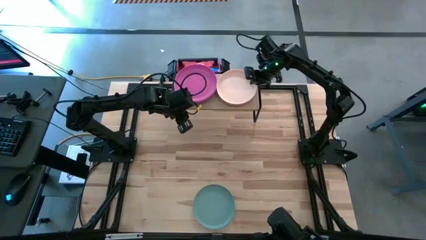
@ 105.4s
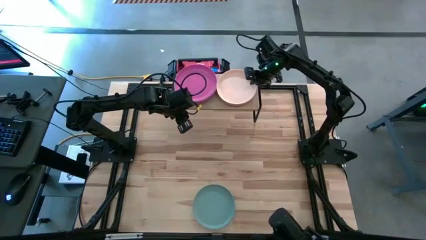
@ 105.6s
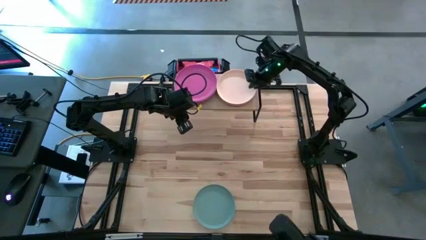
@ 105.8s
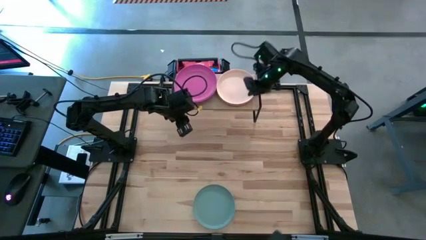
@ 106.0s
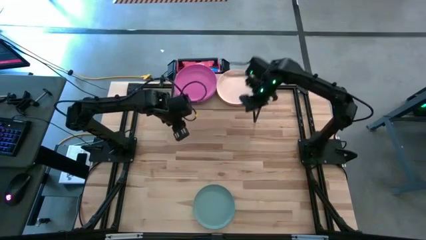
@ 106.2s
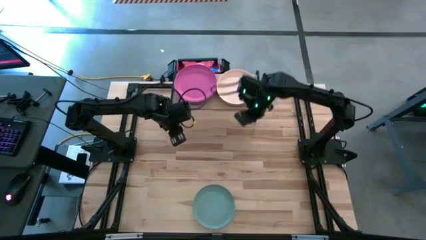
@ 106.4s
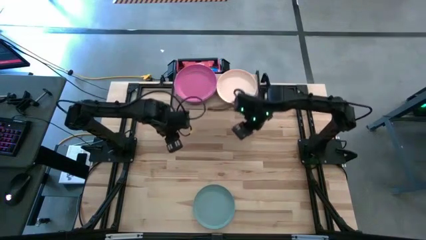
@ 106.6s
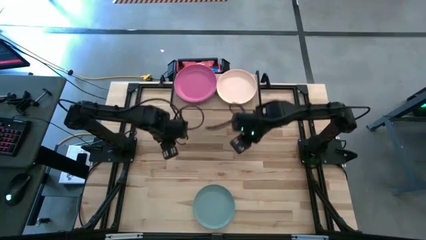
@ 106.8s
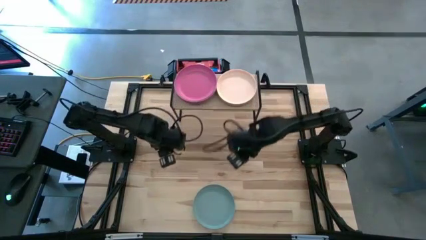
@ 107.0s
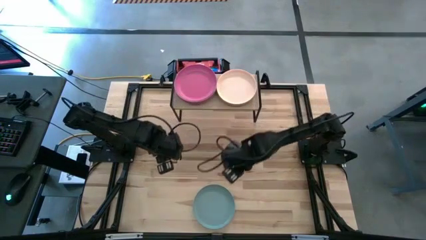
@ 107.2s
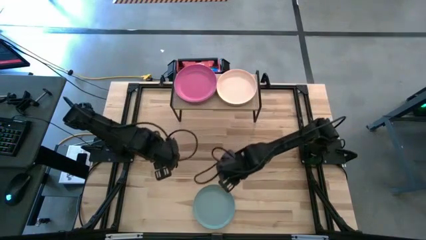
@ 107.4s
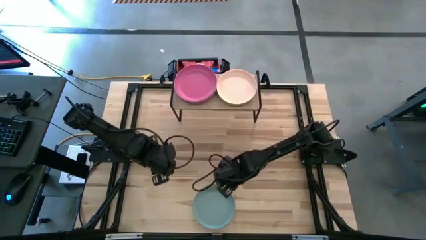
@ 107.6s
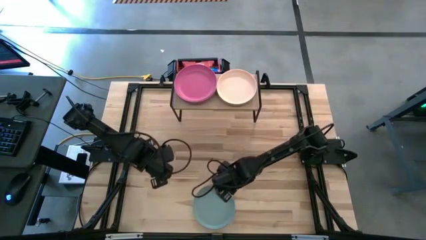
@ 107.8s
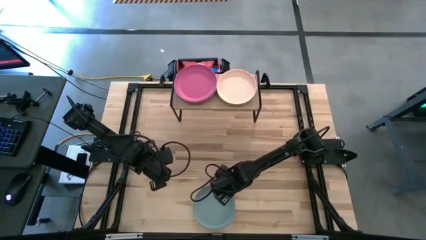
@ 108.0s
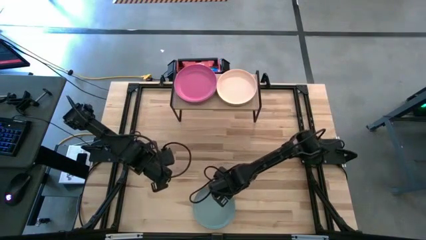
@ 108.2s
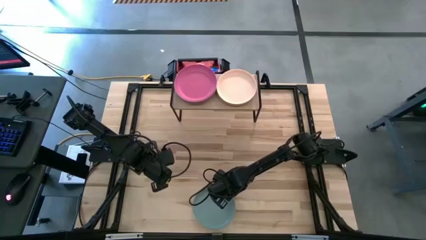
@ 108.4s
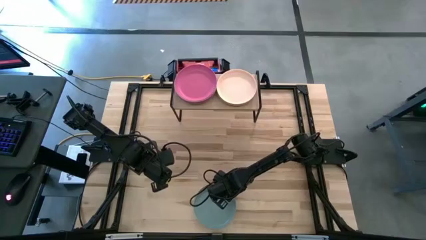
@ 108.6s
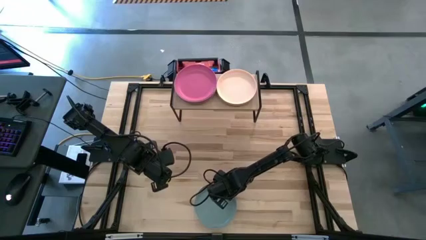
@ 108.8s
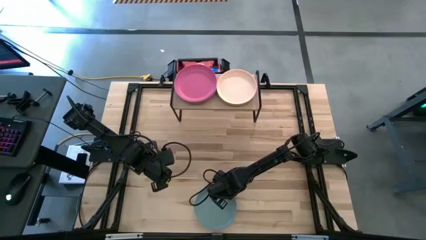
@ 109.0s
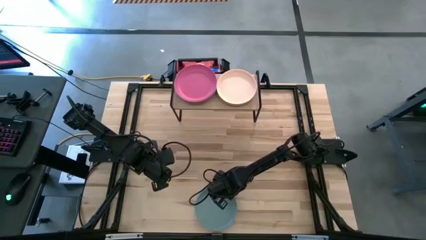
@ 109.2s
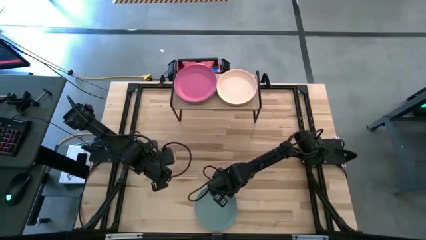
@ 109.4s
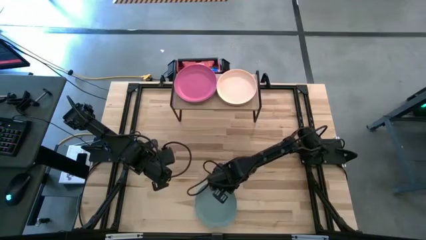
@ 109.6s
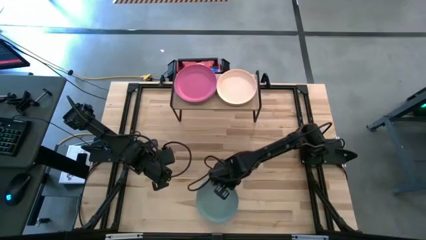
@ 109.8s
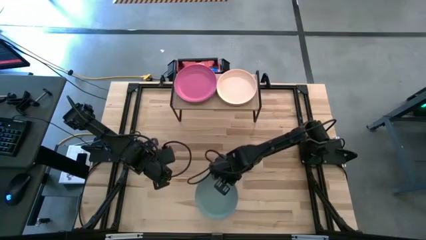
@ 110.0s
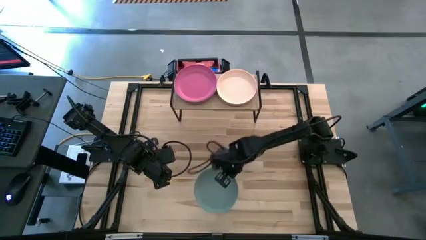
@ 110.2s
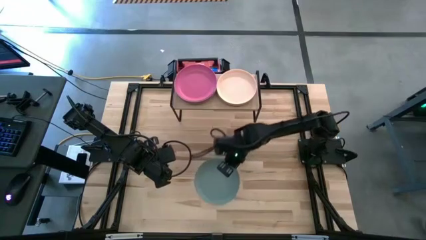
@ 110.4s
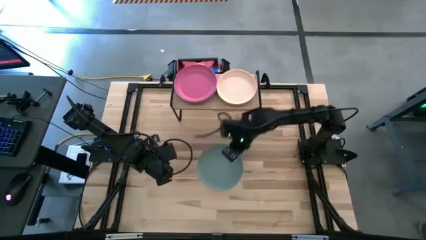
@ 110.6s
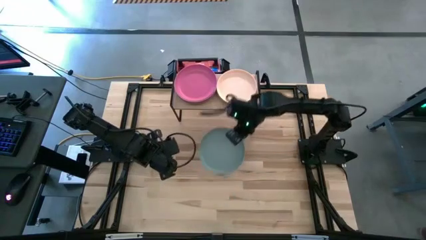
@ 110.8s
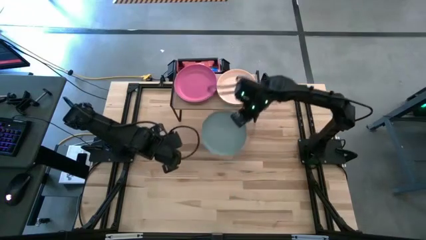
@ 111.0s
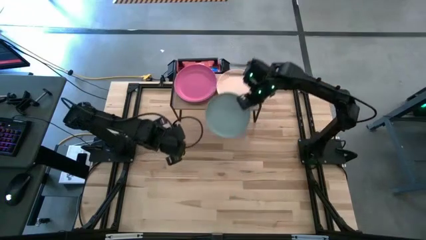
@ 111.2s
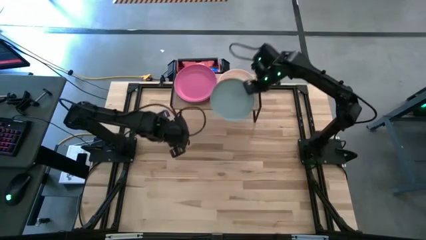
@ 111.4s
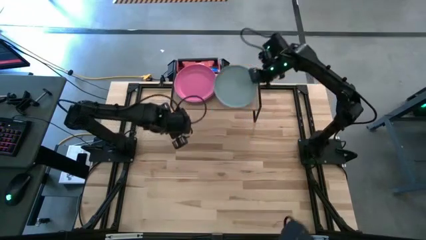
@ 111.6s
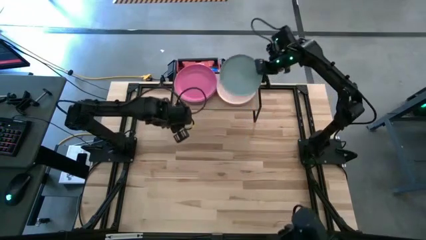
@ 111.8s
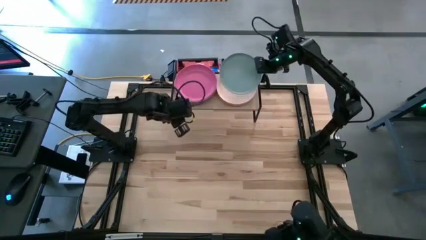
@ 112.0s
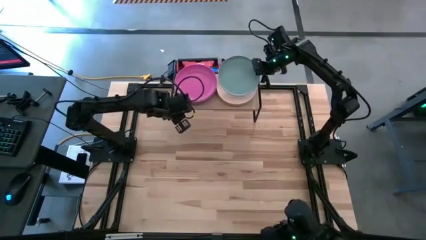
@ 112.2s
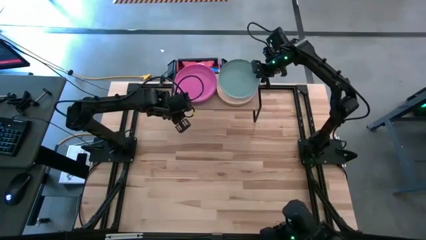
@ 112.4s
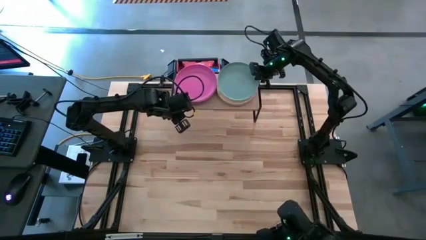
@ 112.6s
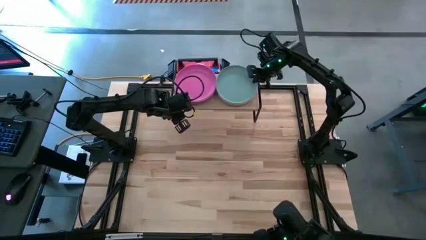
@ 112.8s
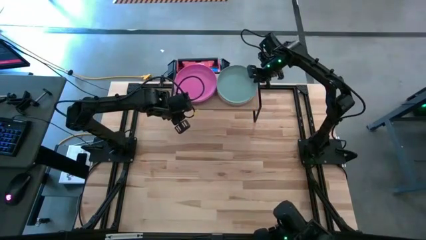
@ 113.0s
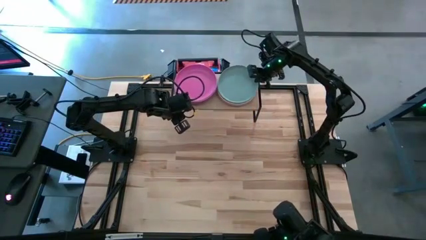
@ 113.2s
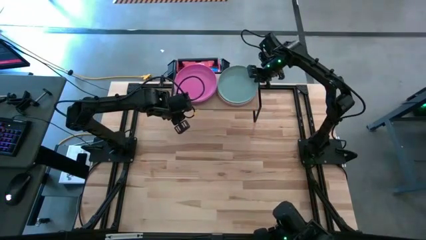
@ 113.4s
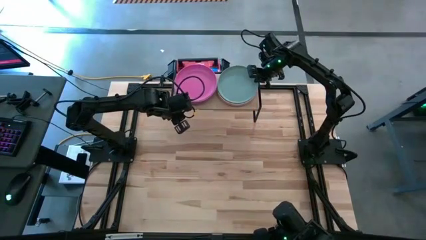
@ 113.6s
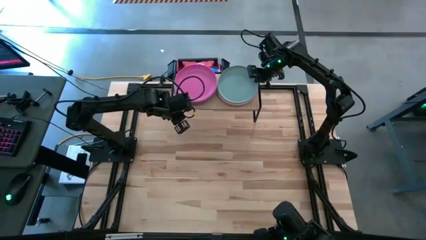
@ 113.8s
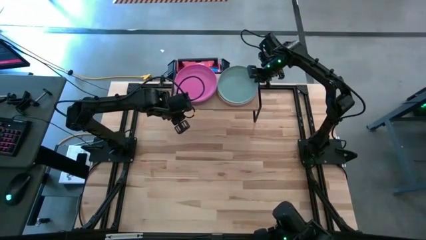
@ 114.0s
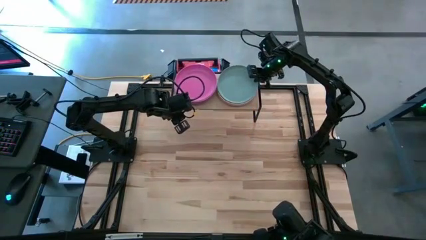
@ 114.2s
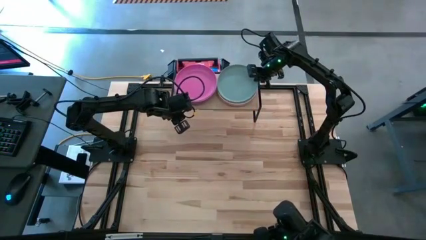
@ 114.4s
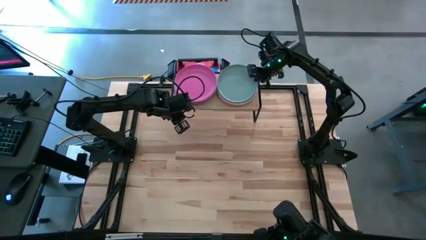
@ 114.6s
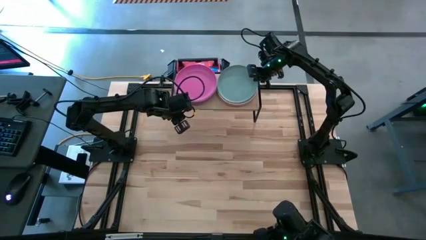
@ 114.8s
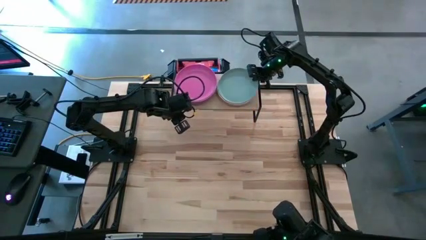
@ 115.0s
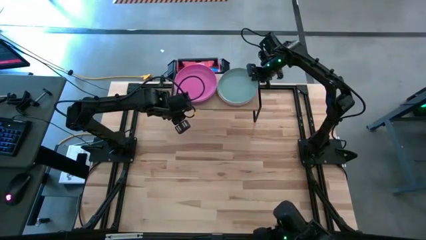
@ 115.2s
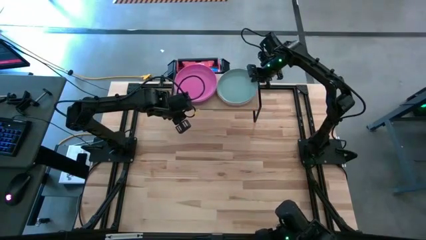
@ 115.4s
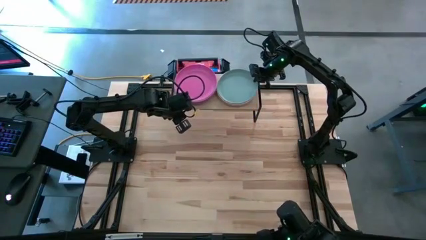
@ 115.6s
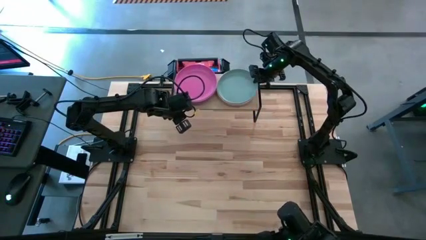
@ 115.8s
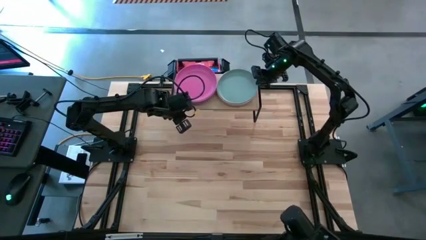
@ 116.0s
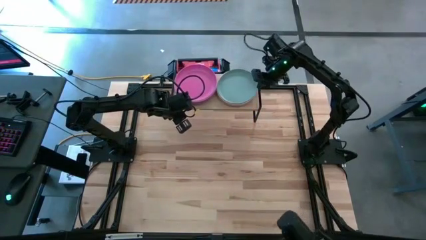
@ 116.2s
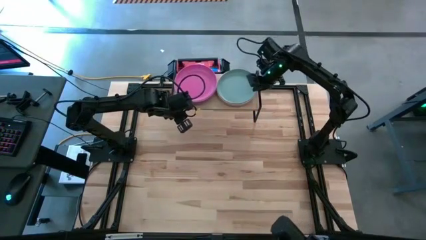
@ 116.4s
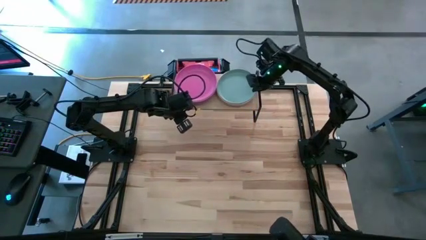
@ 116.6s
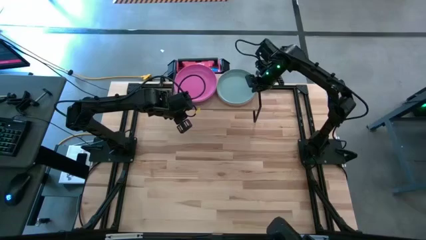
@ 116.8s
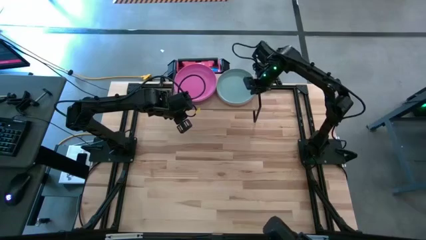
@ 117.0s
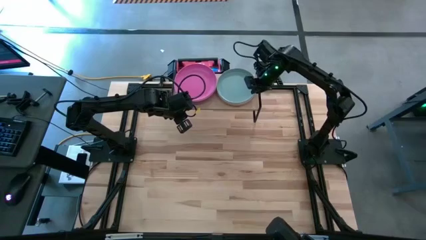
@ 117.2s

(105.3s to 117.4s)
Task: Place and stack plates onto a shelf
Stack the blue plate on top of the light orange plate on the shelf

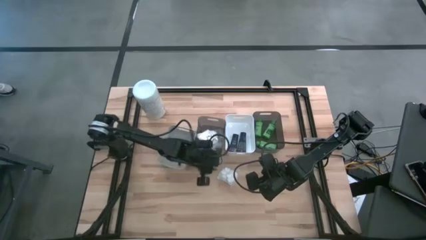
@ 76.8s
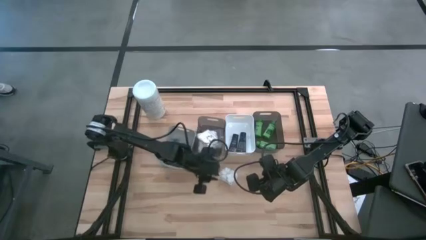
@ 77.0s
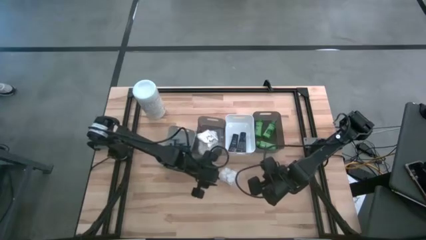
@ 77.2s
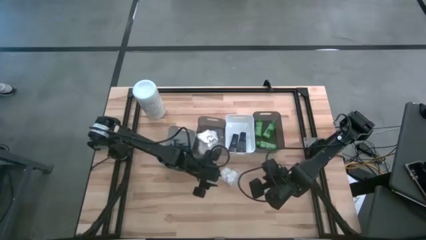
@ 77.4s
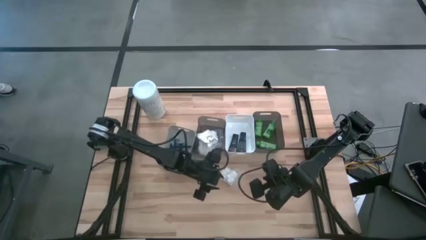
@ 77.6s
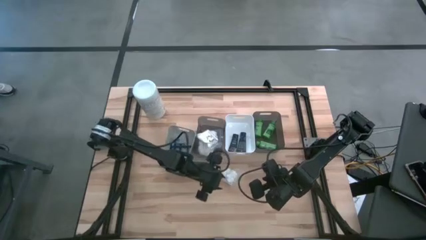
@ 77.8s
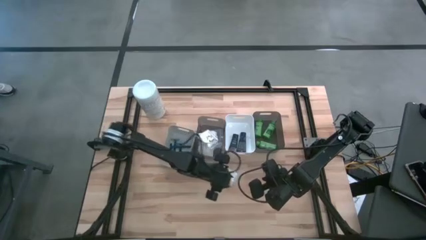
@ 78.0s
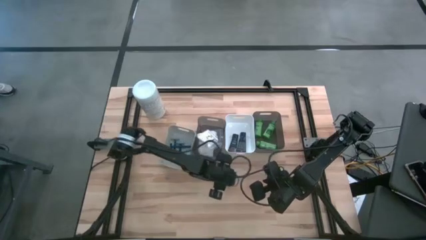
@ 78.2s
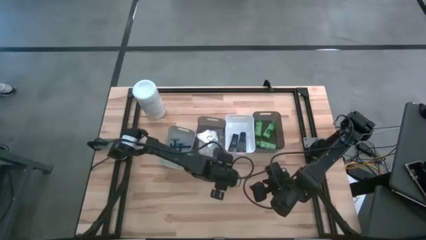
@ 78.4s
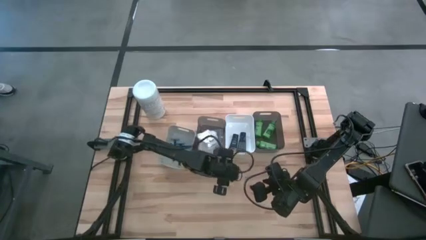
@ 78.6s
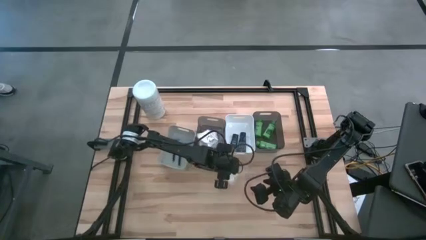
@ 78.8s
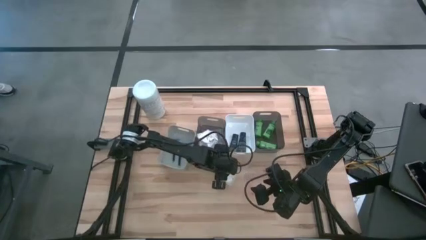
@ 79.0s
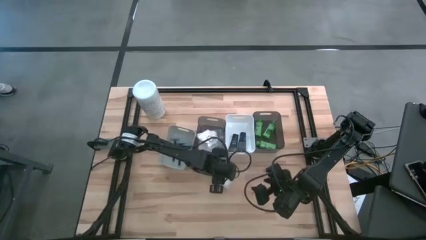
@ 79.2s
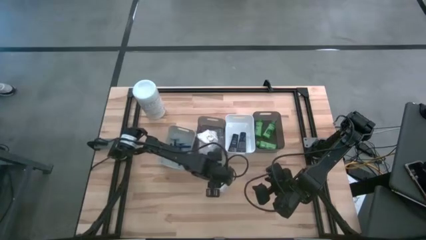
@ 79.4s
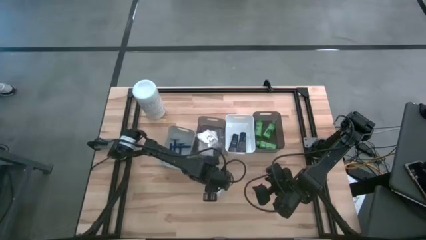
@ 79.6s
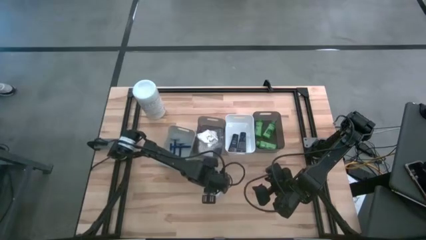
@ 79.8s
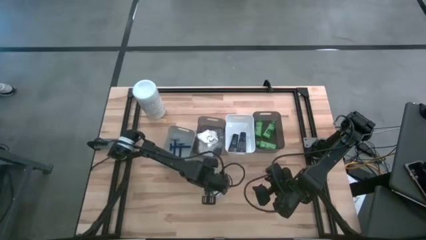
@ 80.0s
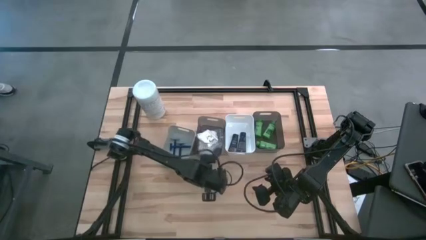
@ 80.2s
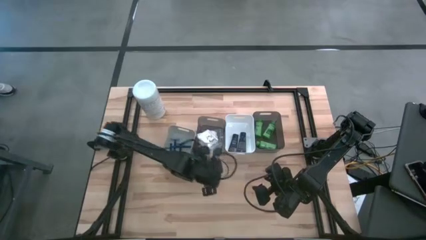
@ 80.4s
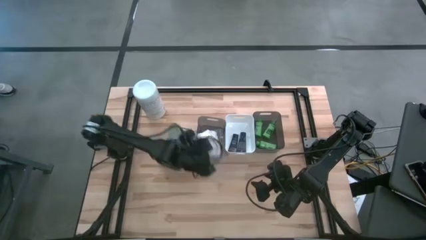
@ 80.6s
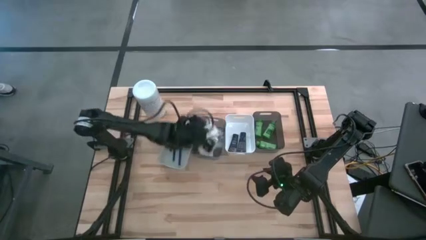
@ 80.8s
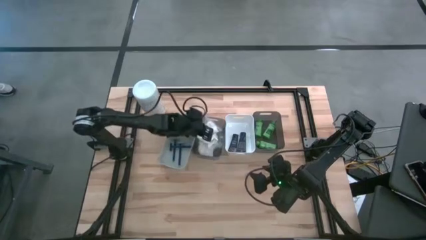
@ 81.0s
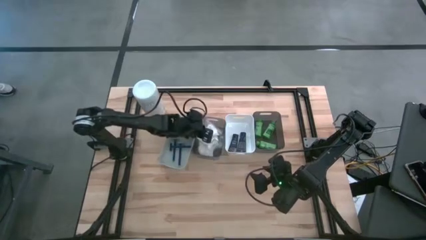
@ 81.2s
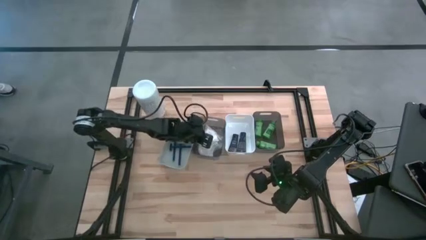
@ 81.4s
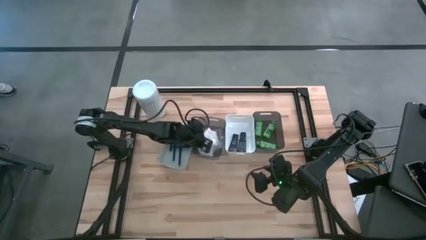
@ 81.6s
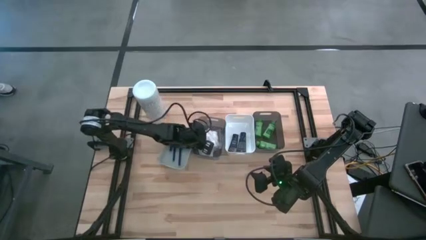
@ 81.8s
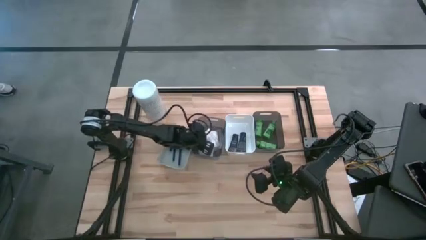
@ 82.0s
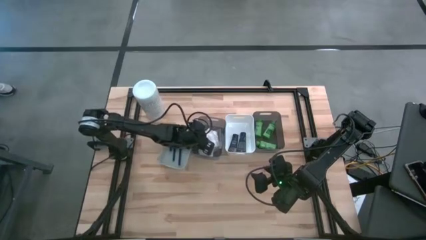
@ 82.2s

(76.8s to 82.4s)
Task: Pick & Place Travel size toiletries
Put the cotton pack into the left black bin
